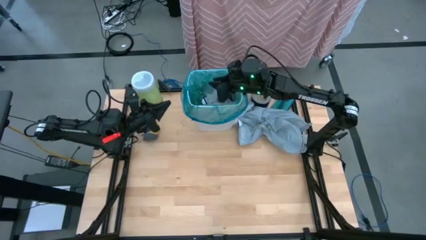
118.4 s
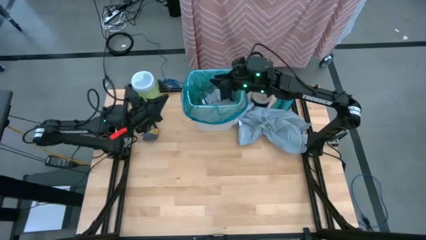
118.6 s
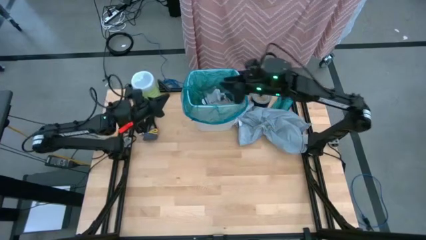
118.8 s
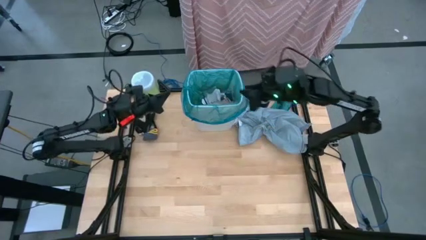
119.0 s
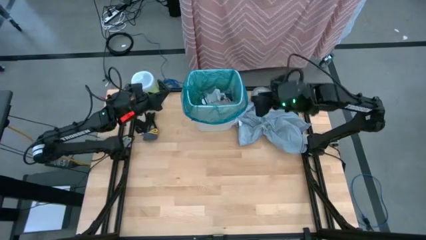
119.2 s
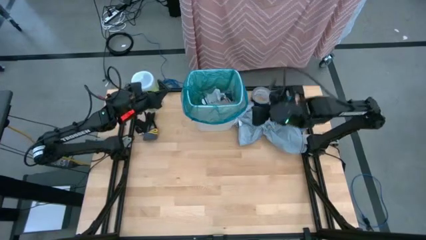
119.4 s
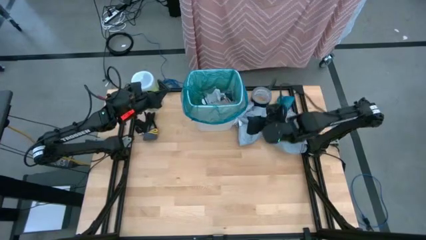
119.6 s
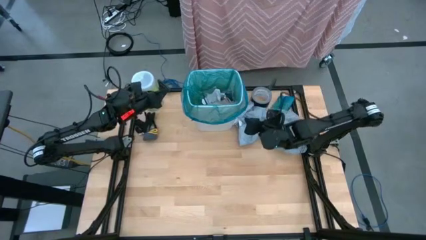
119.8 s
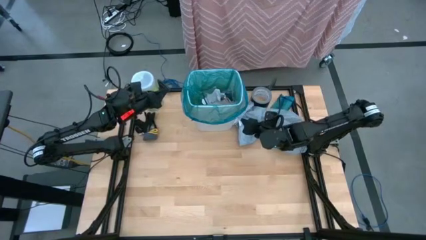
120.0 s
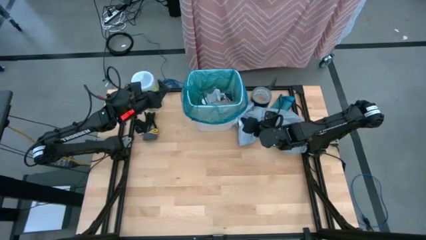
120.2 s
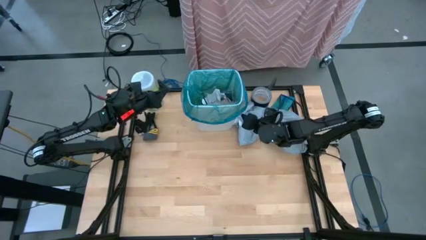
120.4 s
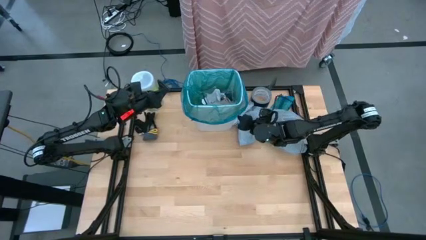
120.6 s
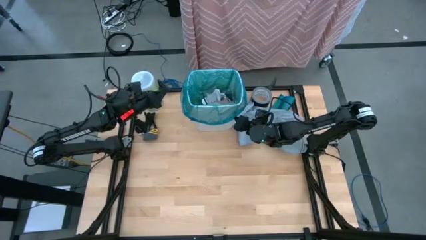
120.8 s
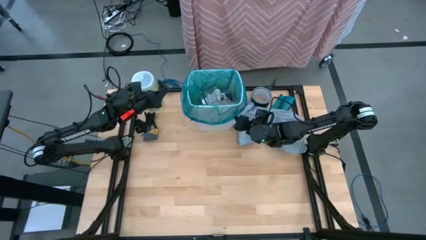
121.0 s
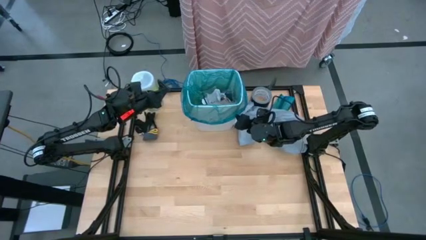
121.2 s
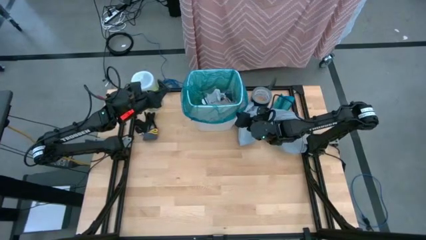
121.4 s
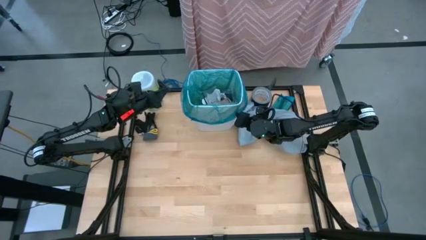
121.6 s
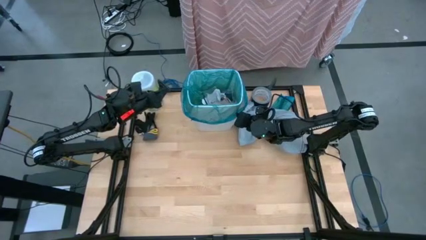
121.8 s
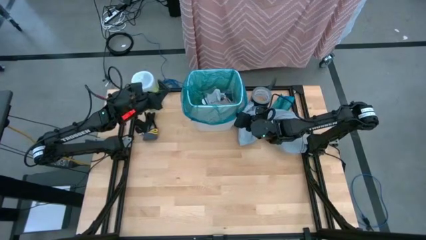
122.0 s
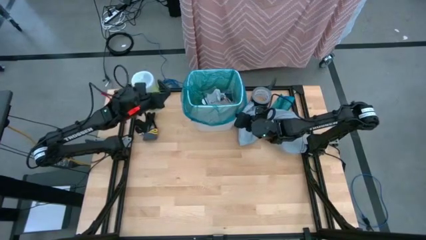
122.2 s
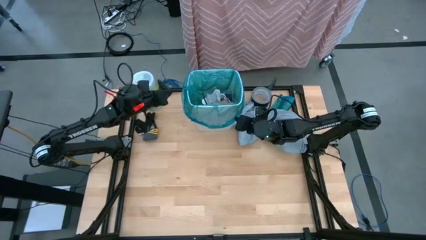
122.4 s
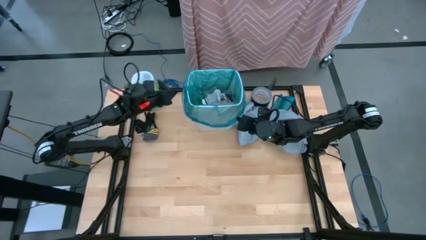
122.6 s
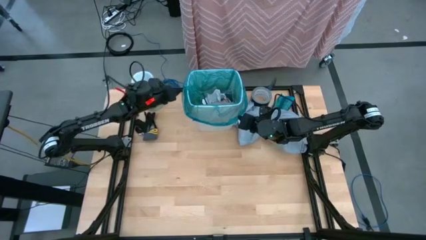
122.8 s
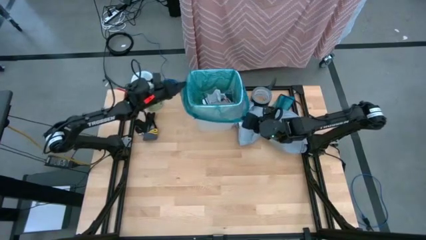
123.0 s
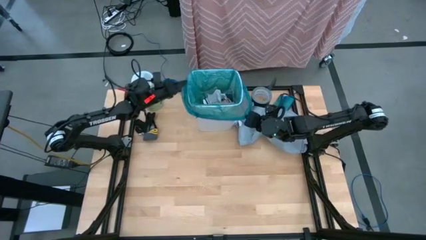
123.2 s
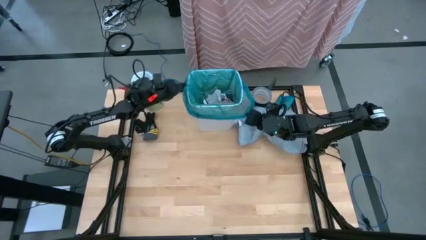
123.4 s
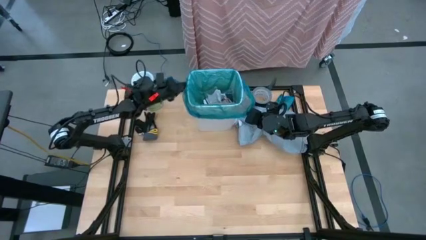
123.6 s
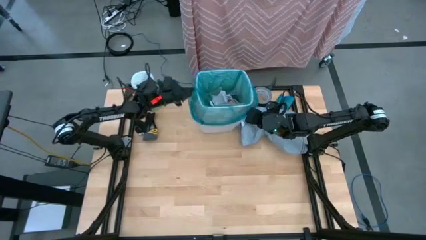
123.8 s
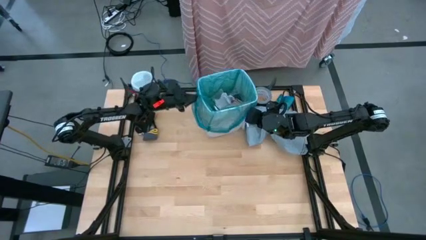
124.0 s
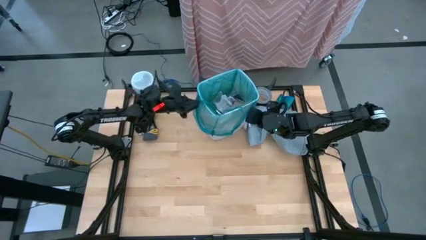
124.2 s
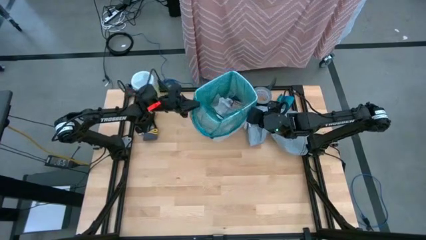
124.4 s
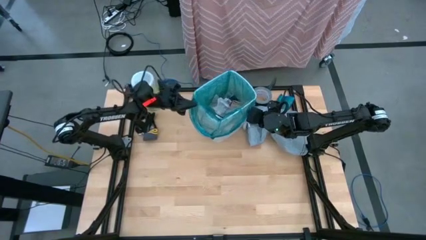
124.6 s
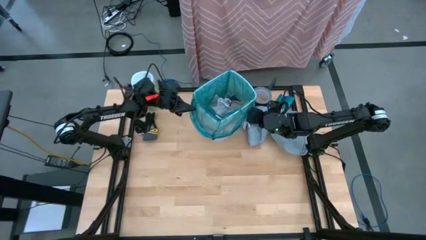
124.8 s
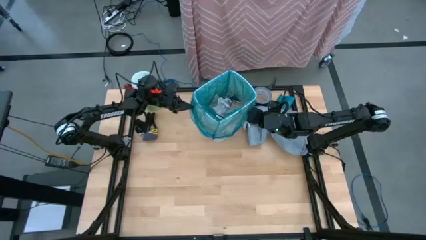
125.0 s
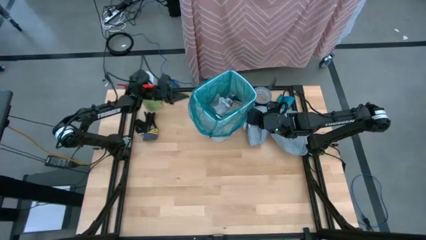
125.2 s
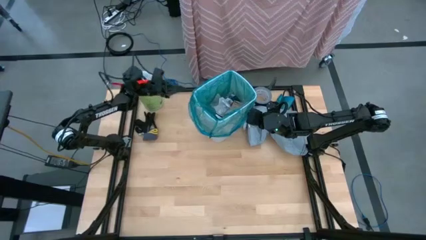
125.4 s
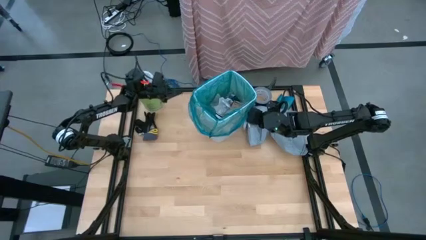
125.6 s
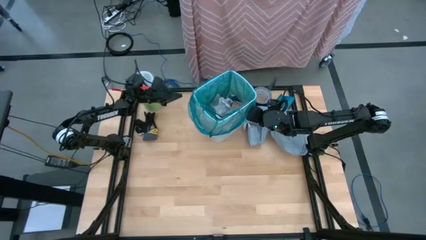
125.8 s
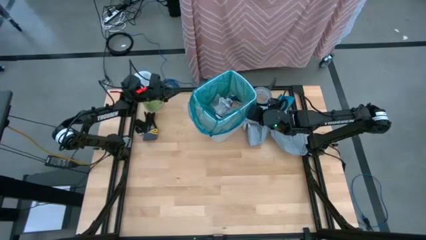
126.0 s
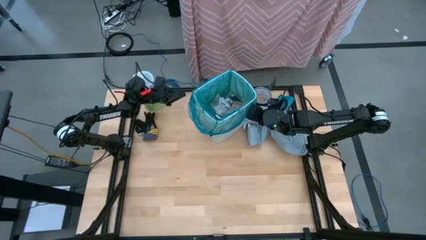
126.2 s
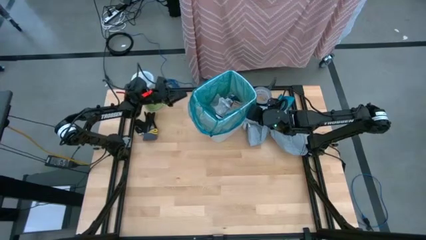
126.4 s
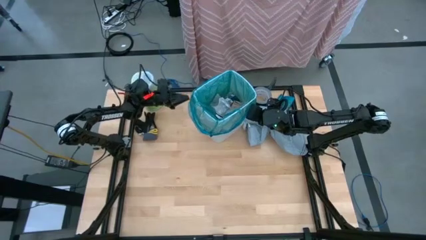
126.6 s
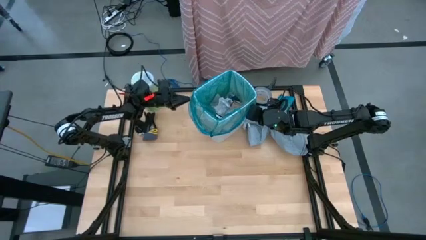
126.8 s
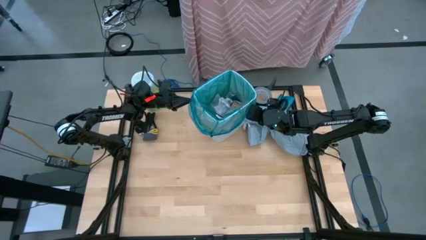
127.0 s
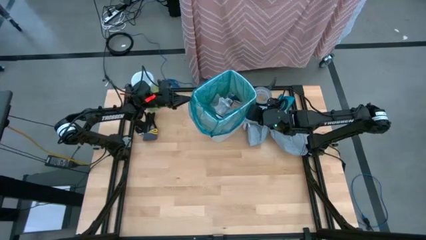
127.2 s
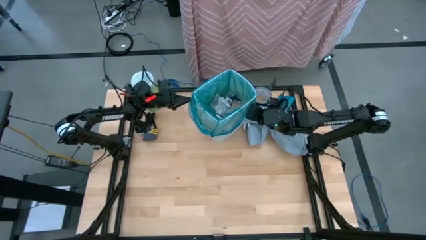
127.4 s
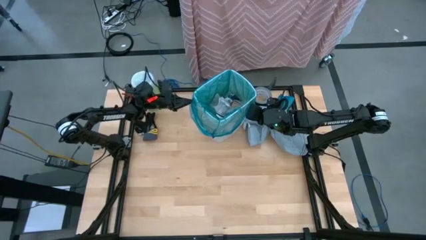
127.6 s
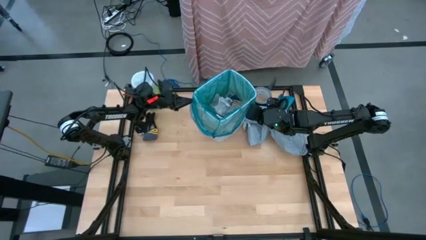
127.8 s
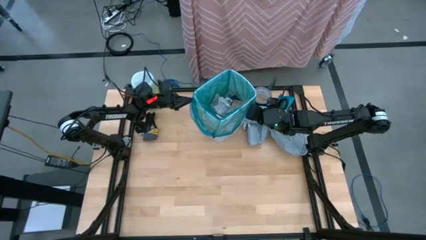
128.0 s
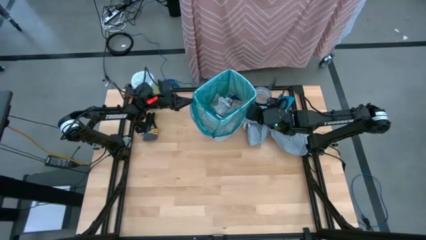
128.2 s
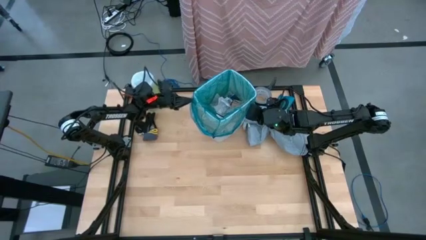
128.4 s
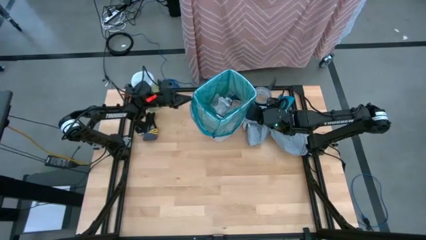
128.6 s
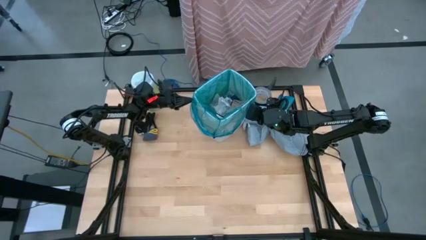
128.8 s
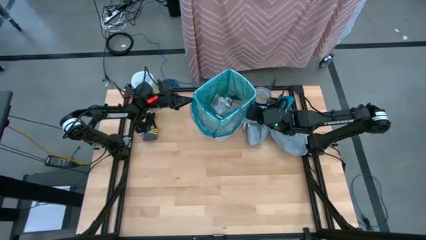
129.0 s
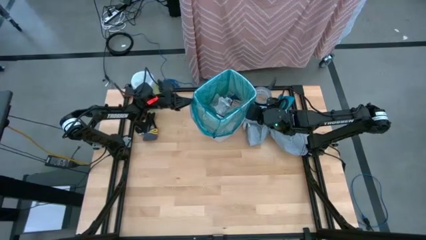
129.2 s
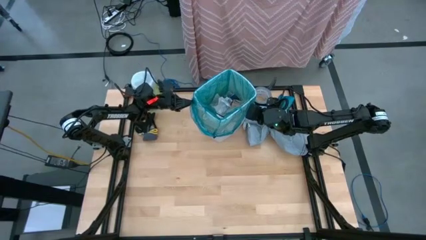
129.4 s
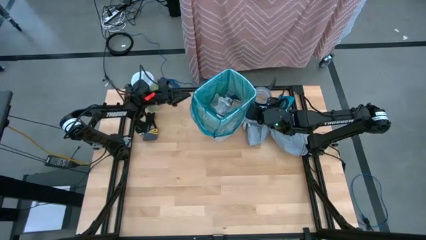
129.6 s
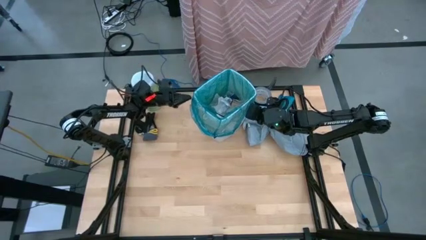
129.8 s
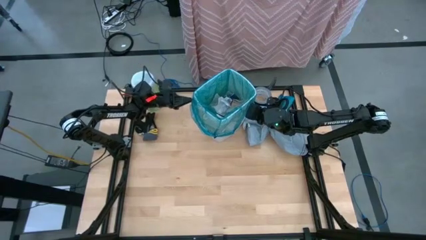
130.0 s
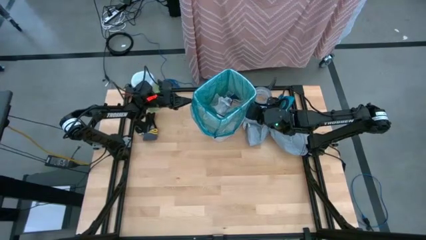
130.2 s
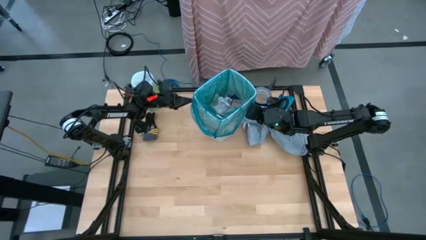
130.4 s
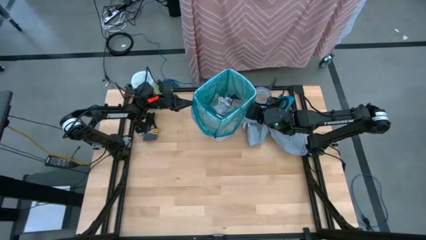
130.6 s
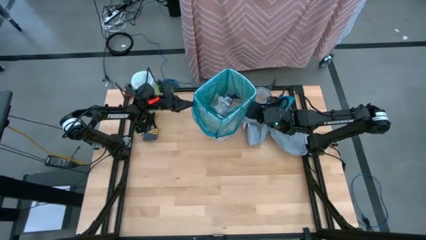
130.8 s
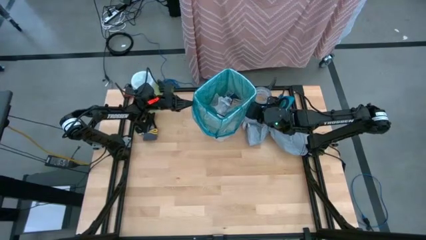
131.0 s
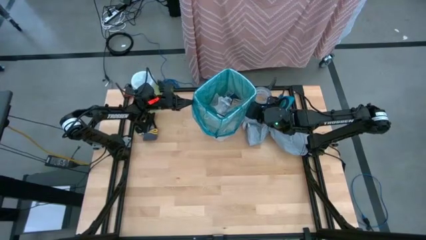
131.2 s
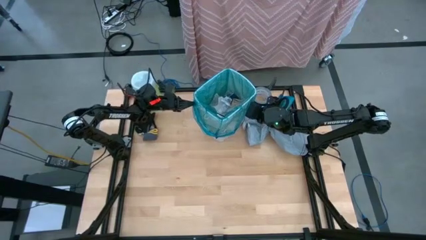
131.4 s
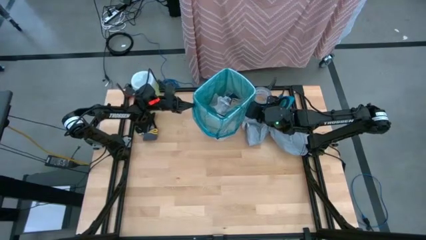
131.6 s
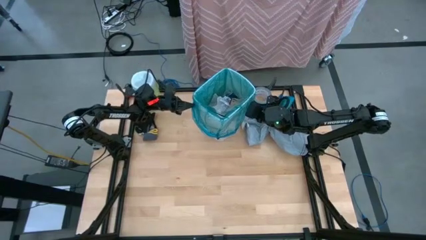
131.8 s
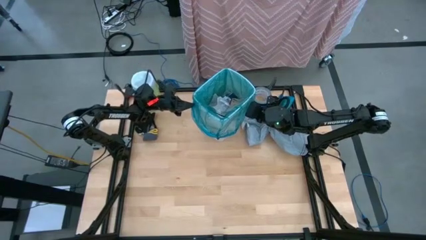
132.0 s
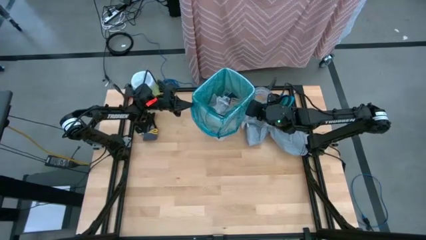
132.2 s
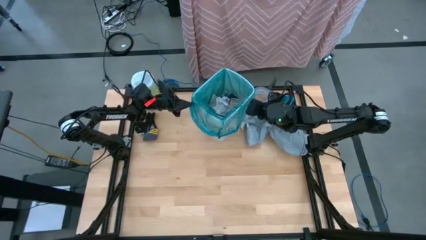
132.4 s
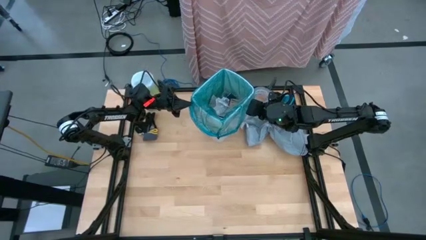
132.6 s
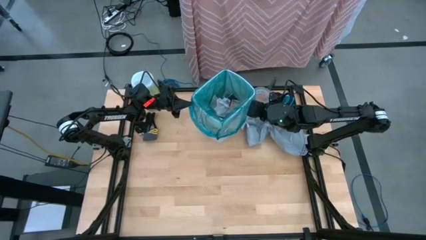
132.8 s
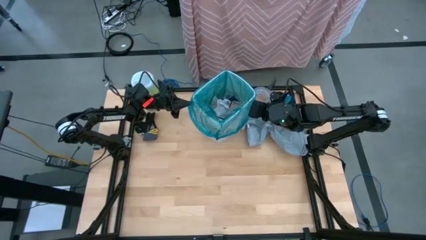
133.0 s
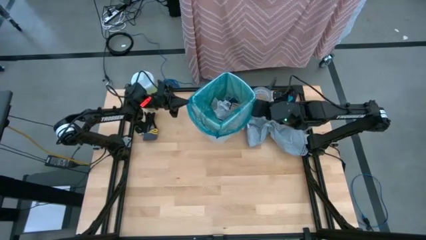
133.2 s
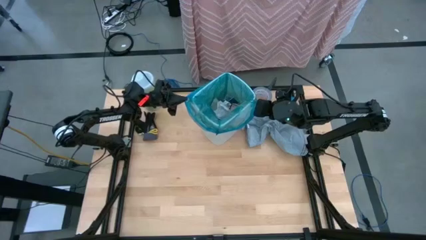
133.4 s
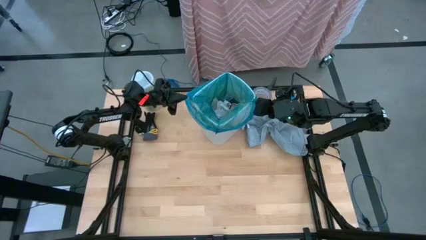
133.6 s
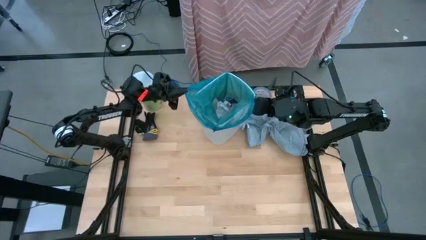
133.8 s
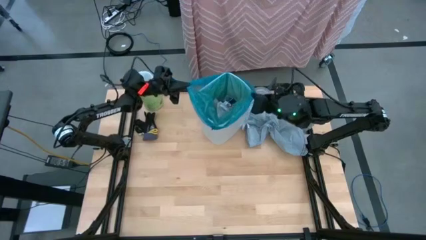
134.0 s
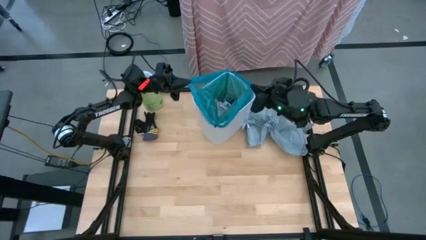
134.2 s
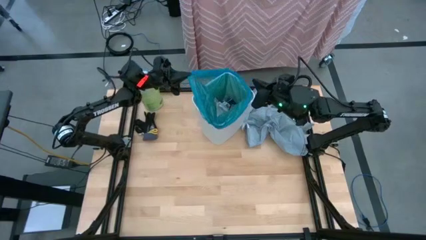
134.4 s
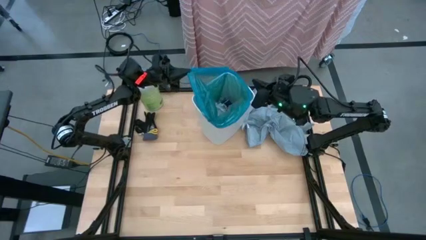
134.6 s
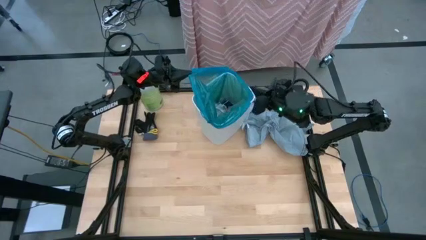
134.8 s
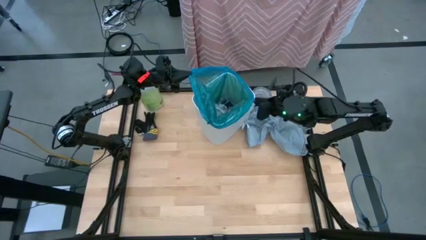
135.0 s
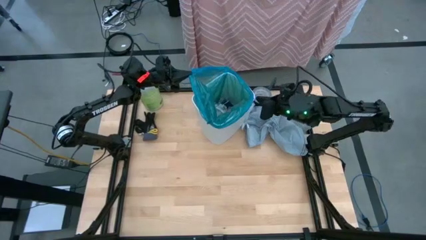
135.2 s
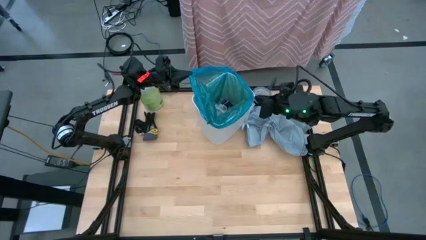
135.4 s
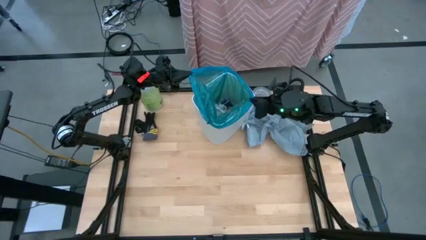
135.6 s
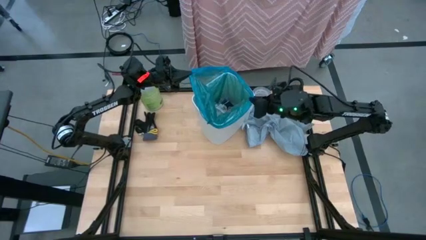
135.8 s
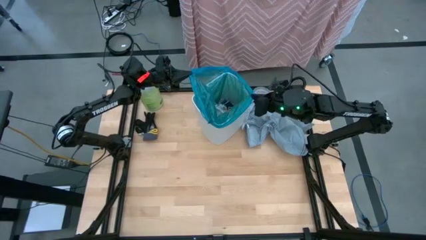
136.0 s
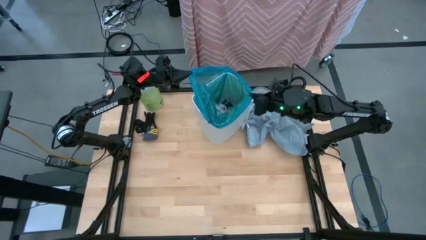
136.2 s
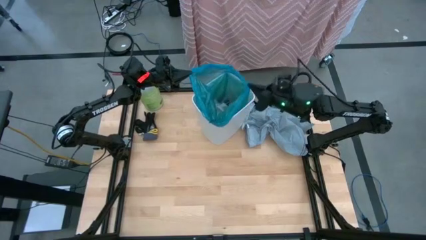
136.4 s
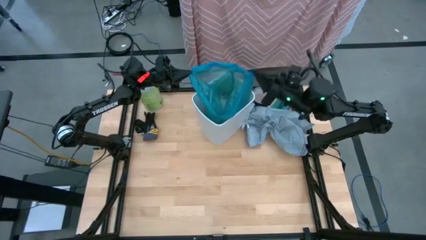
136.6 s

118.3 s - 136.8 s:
Task: place trash/remove bag and relplace
Close the trash bag
